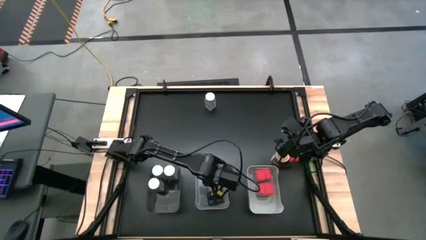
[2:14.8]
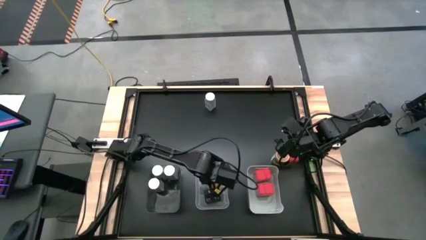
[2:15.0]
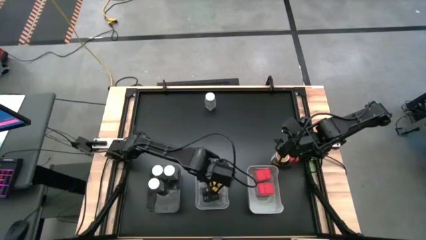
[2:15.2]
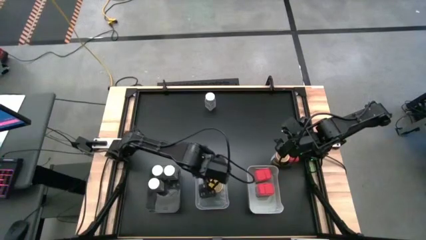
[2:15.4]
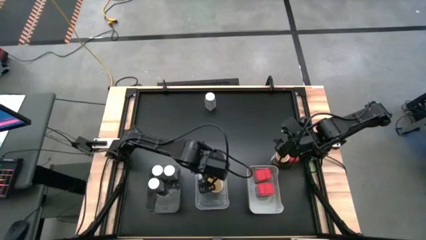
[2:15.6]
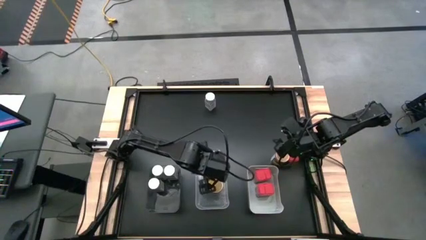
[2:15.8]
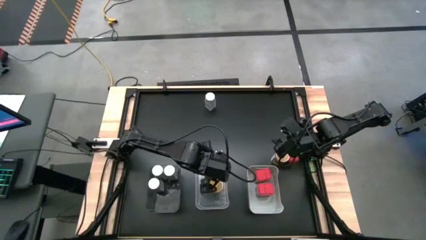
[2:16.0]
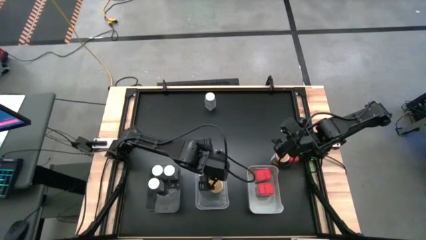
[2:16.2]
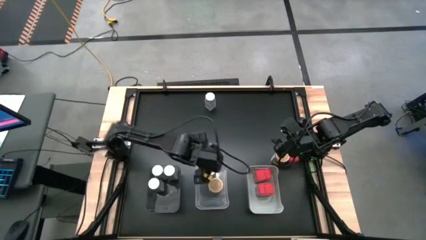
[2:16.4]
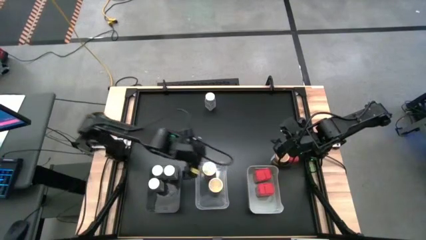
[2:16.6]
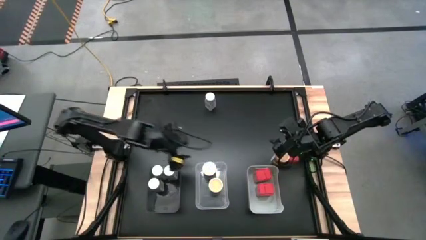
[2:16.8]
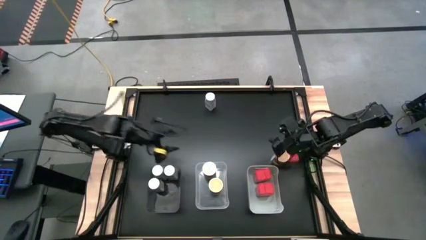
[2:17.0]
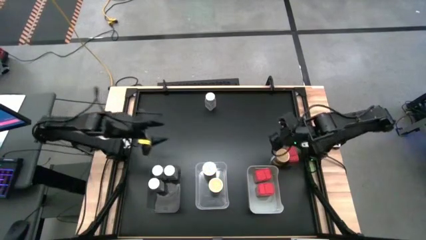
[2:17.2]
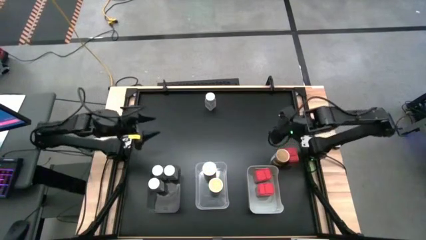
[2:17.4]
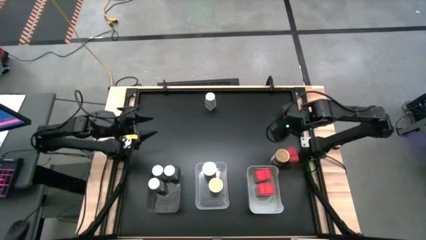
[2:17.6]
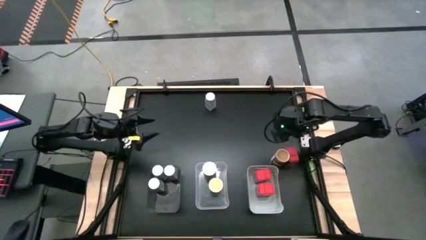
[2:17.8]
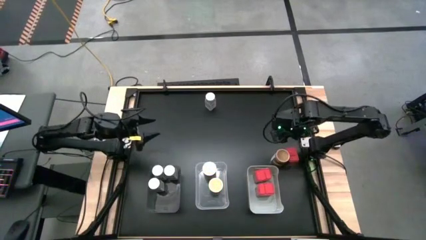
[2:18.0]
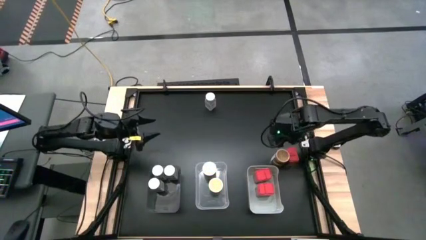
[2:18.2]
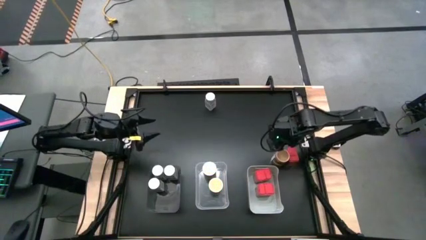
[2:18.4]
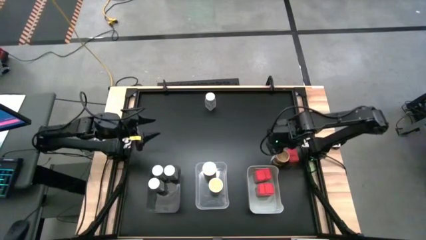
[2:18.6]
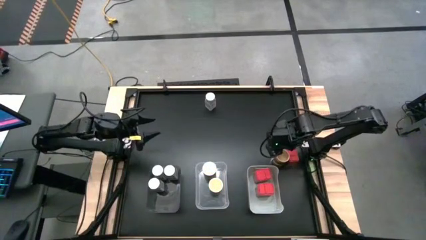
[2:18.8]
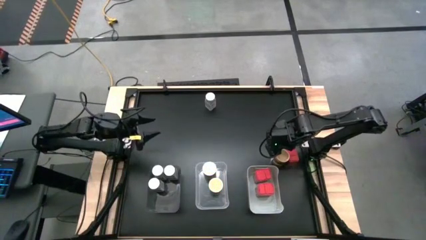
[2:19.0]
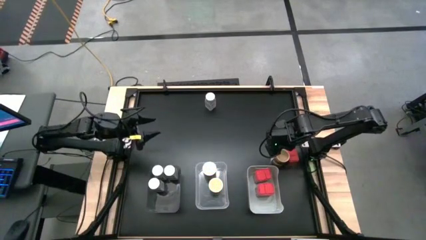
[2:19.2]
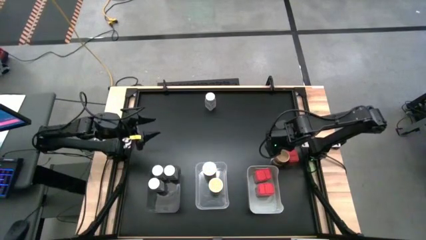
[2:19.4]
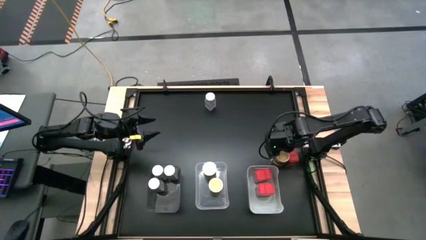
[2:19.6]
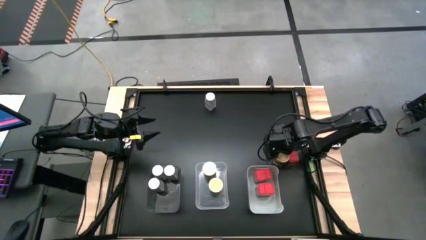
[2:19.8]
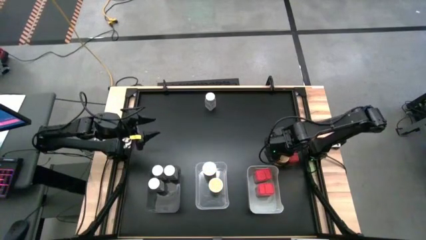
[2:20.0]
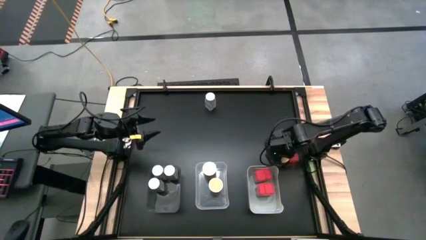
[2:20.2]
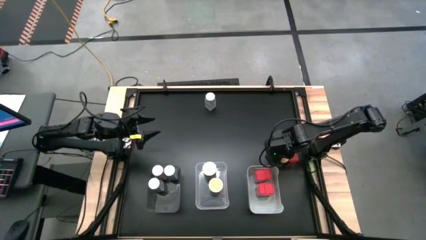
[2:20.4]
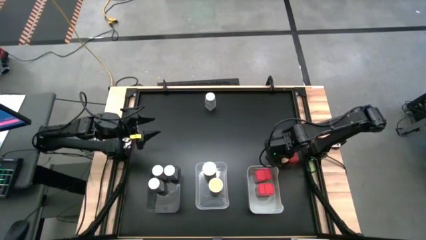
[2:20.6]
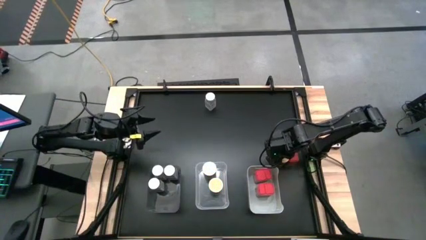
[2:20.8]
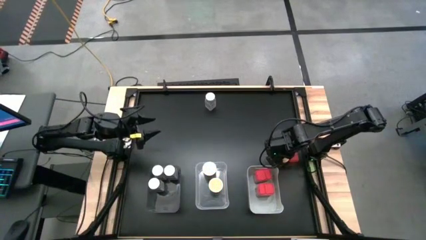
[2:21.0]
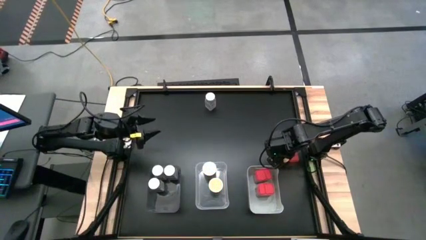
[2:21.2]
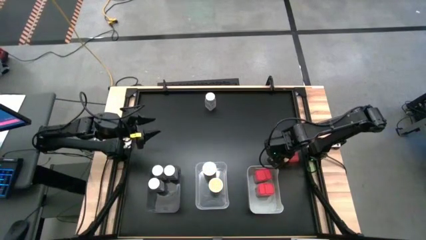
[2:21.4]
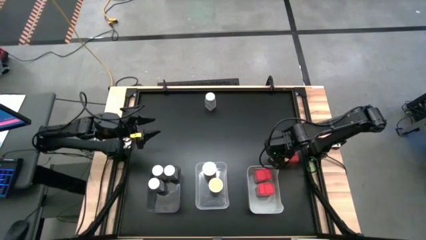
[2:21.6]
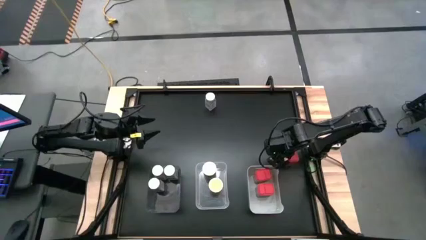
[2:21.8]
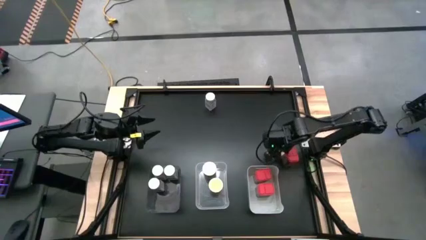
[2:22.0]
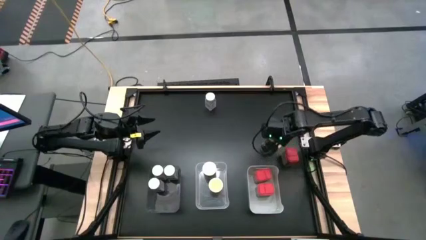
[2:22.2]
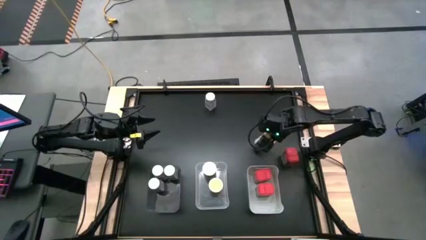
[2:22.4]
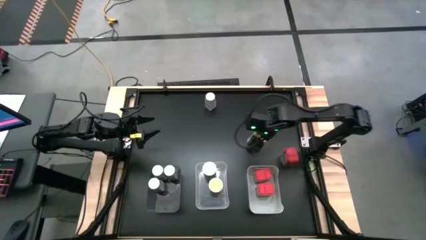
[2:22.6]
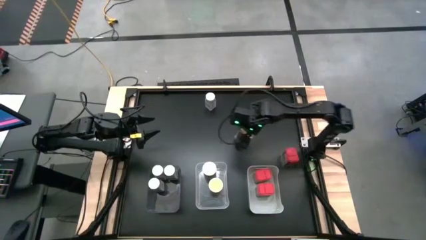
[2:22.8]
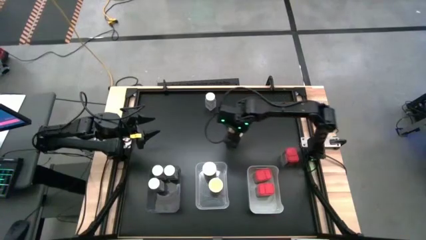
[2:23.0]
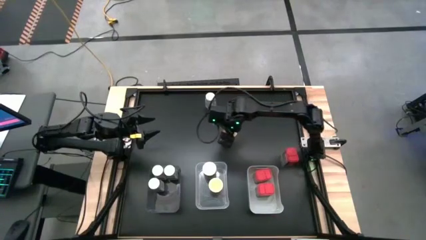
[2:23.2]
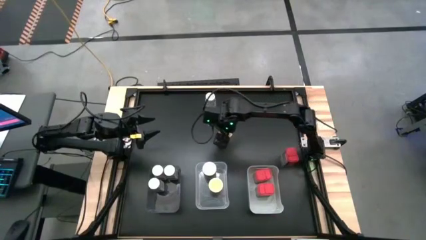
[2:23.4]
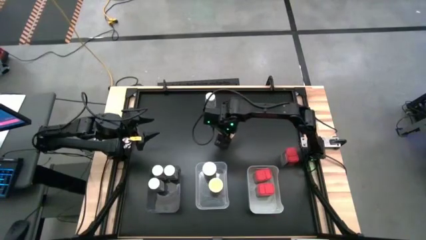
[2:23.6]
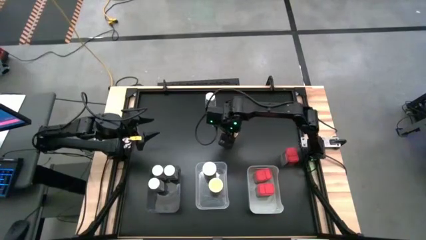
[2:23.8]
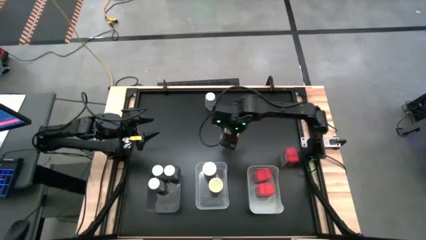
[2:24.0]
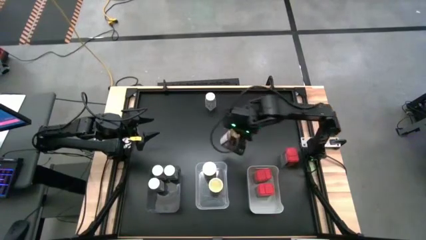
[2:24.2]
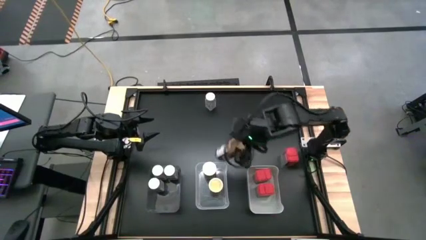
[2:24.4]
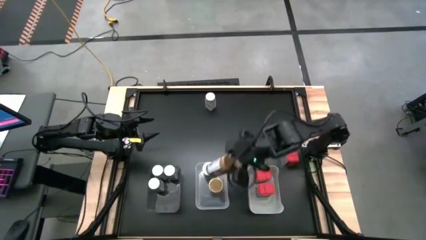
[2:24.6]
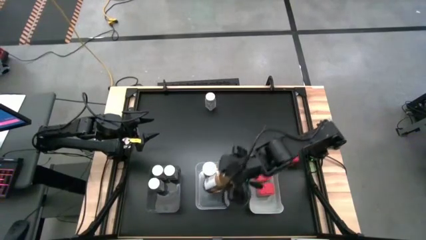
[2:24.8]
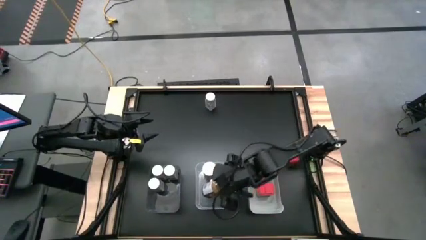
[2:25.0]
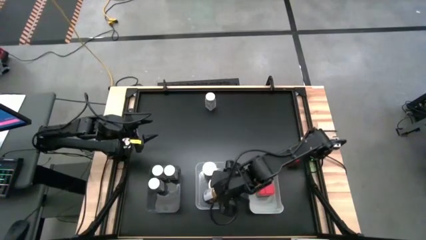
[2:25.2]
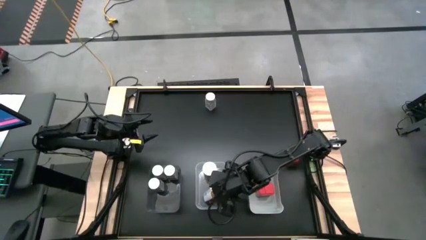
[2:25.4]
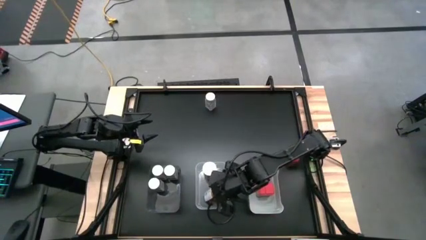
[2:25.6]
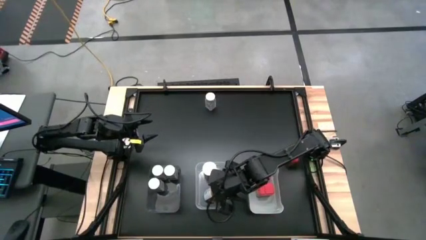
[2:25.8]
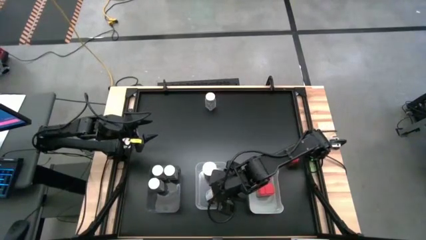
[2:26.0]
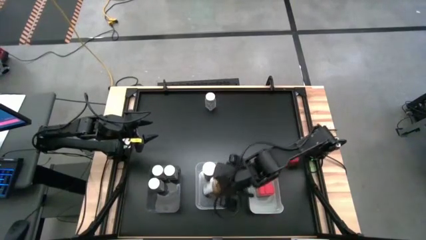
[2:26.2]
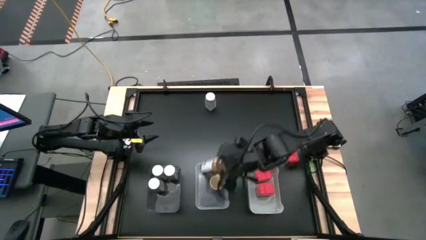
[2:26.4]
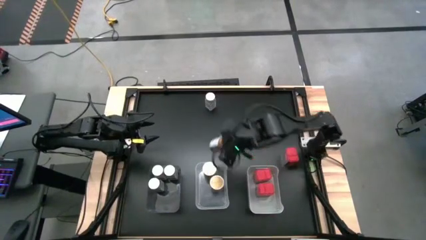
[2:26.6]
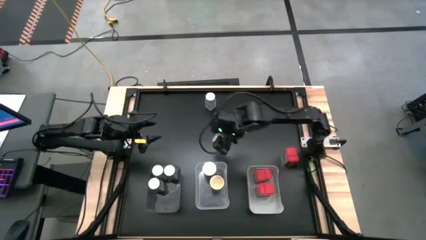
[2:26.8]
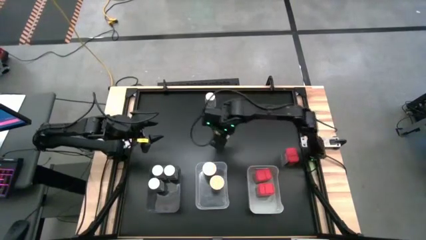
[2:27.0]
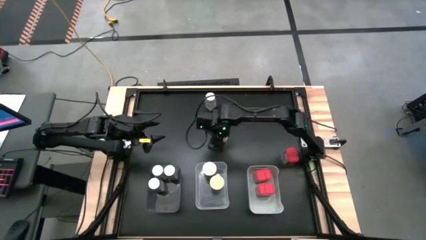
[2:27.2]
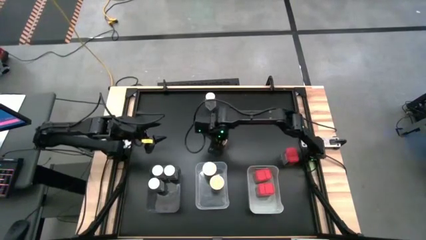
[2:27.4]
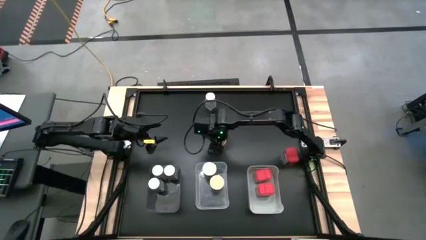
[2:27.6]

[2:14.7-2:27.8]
Task: Sort spices by type
Move the golden seasoning bottle to the middle of the table

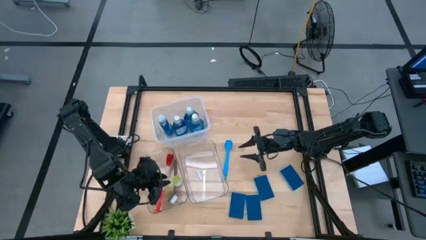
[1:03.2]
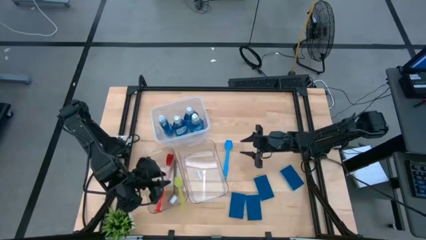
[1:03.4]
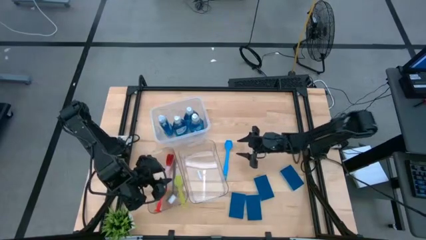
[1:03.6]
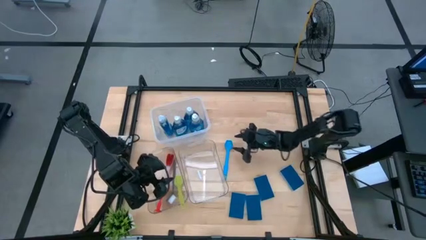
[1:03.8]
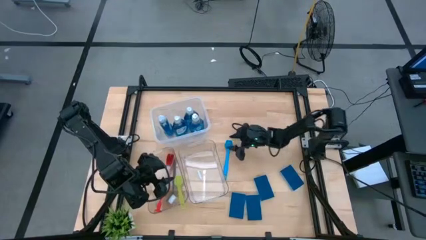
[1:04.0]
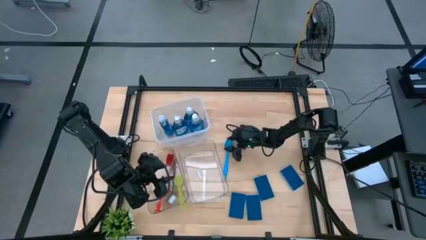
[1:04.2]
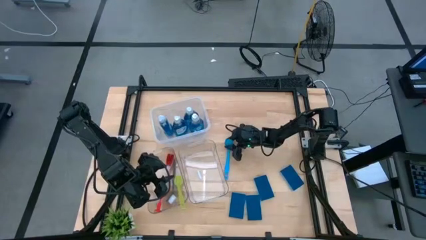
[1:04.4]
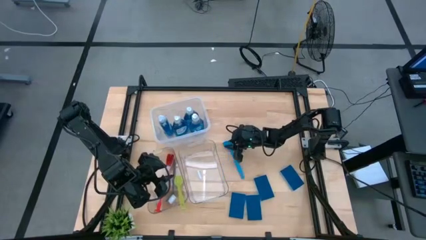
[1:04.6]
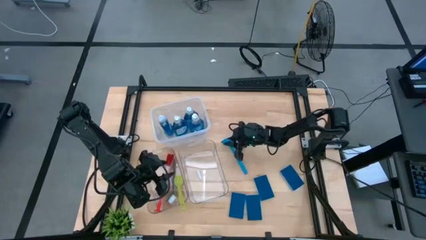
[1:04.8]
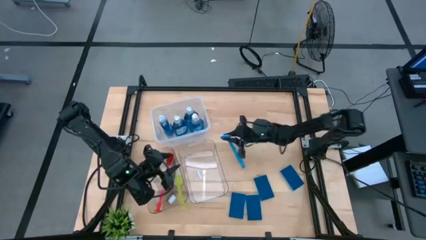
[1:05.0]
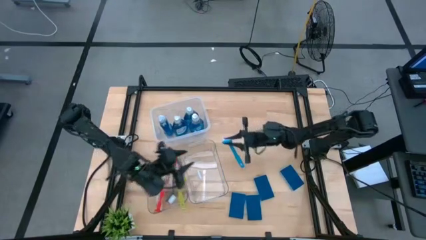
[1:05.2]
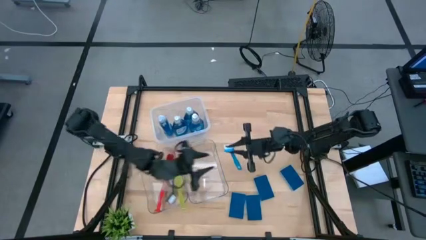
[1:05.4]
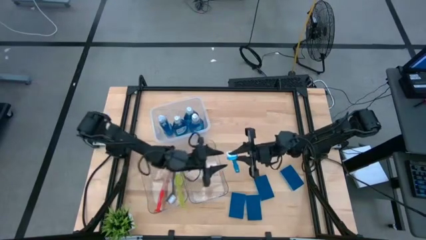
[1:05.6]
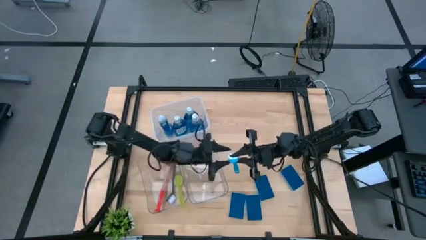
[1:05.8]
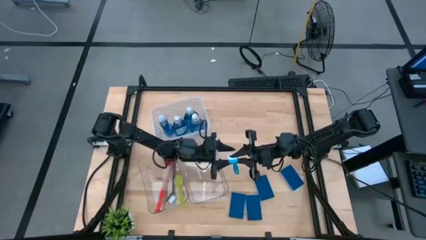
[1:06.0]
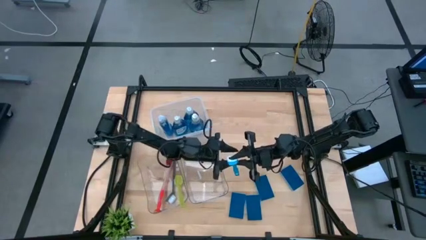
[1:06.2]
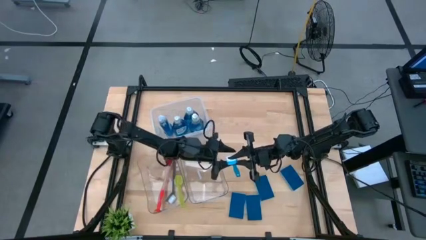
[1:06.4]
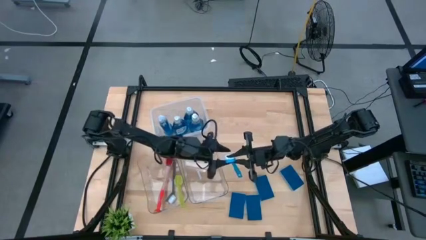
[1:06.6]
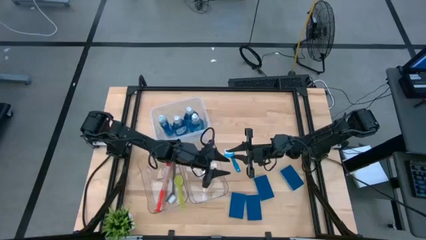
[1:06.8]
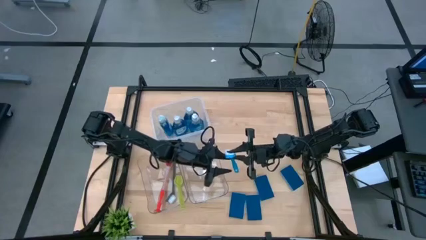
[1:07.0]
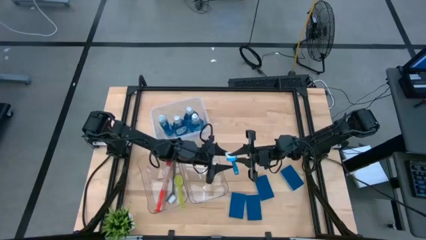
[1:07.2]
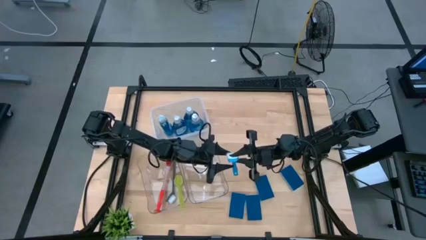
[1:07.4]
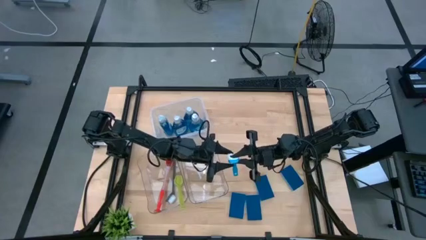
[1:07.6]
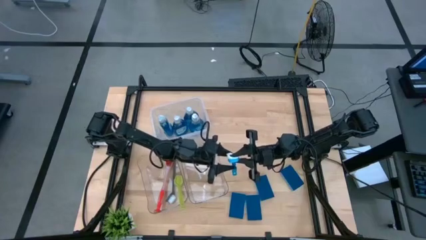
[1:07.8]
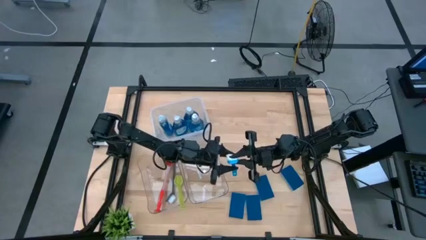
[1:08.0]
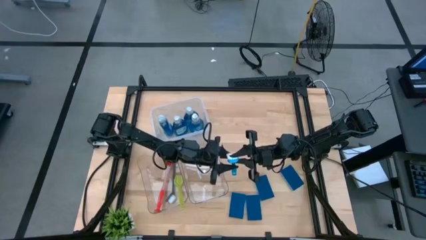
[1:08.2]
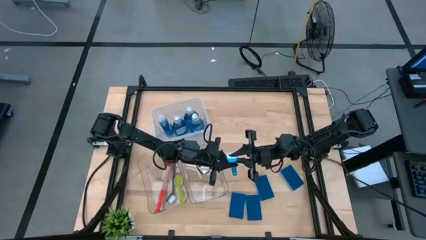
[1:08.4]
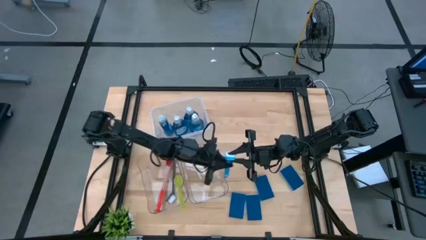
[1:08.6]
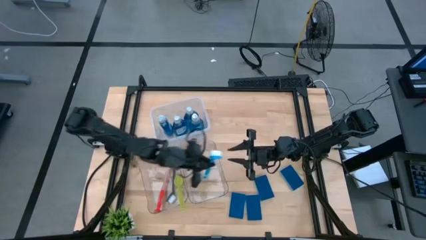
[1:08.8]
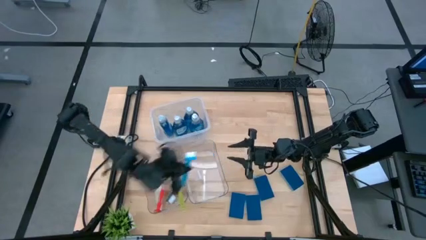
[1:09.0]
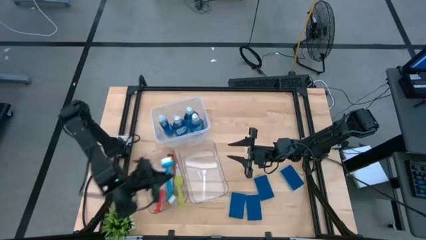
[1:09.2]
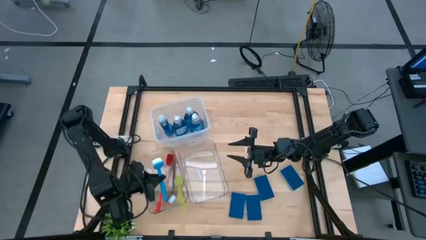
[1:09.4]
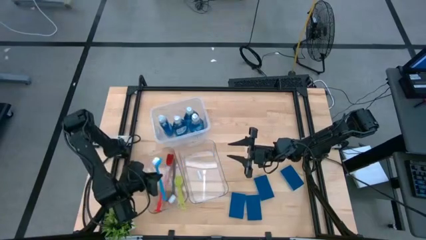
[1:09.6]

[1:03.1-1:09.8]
Task: Pick & Place Kitchen Sink Supplies
Put the blue dishwashing brush into the left transparent bin
